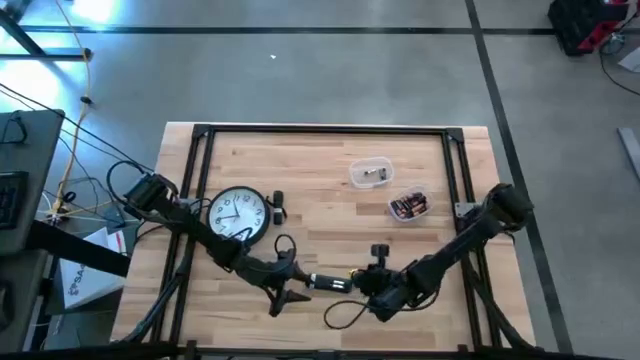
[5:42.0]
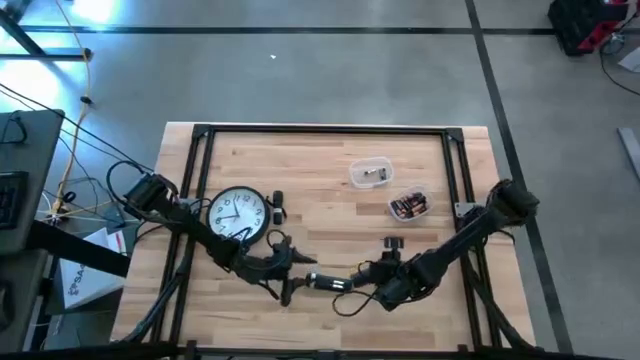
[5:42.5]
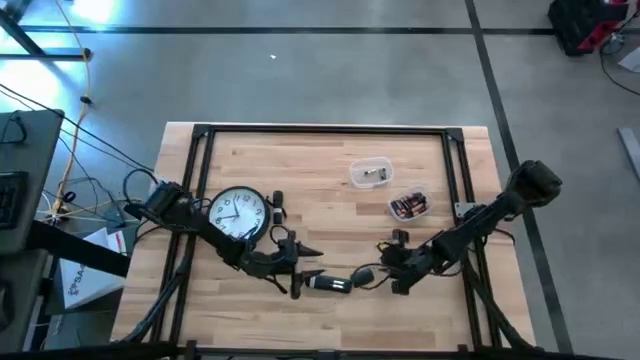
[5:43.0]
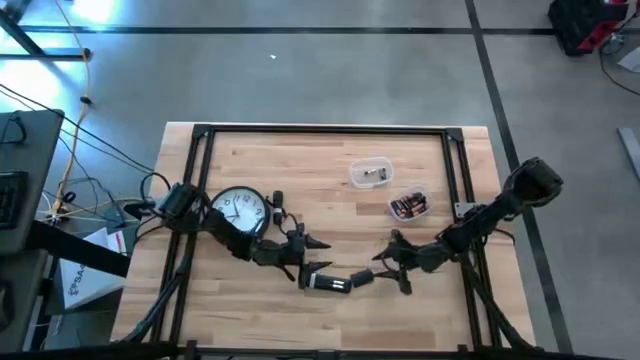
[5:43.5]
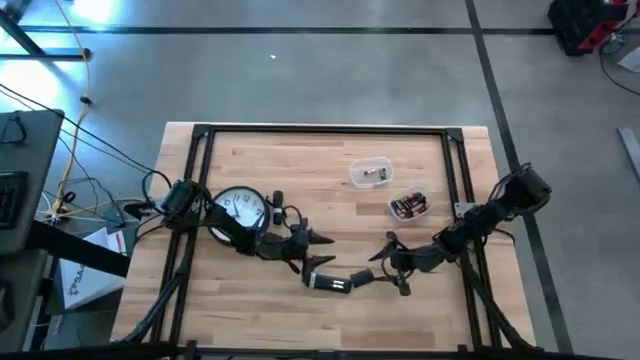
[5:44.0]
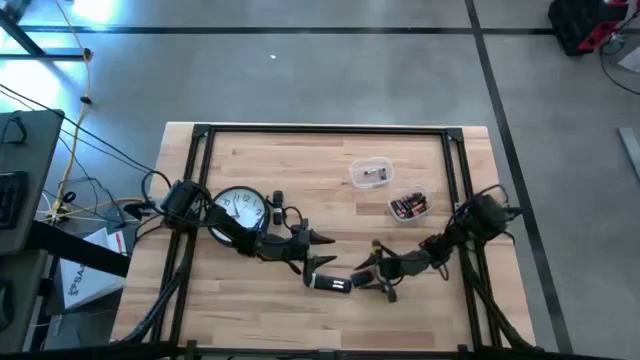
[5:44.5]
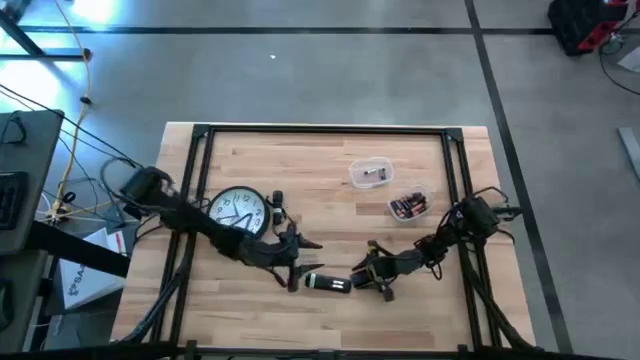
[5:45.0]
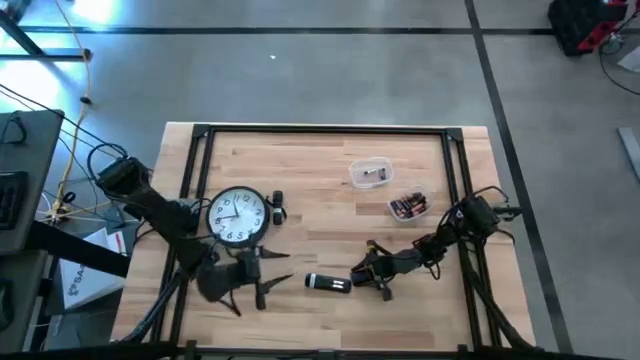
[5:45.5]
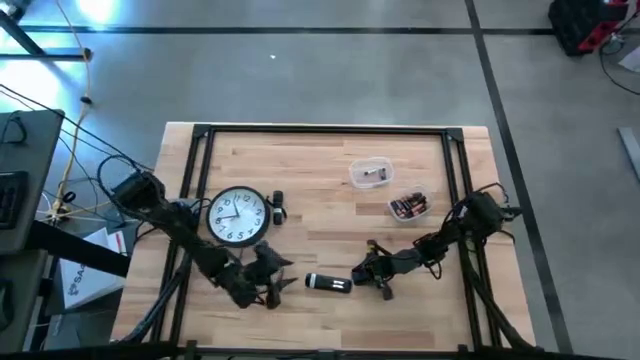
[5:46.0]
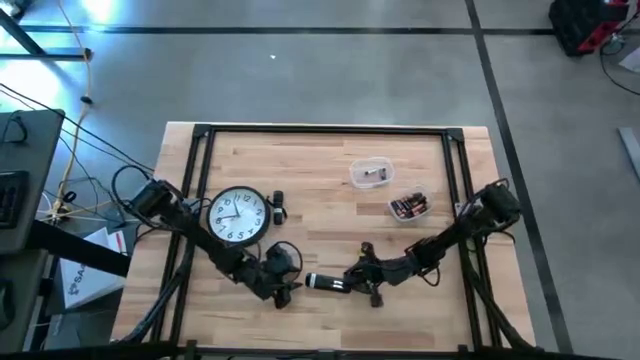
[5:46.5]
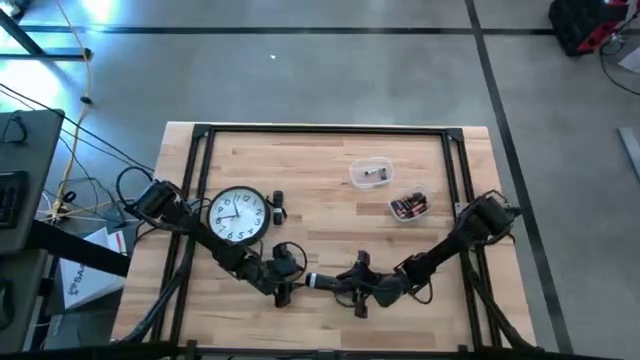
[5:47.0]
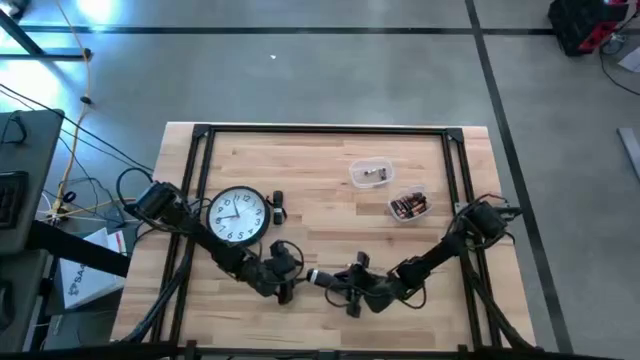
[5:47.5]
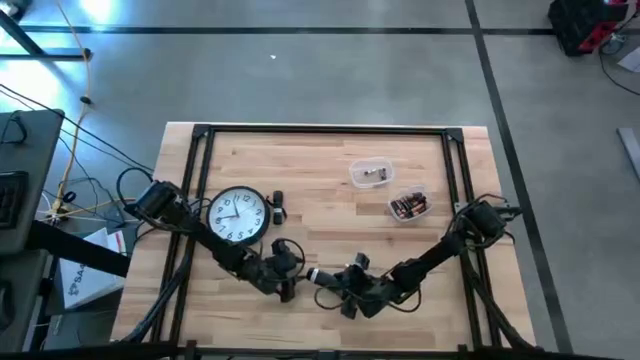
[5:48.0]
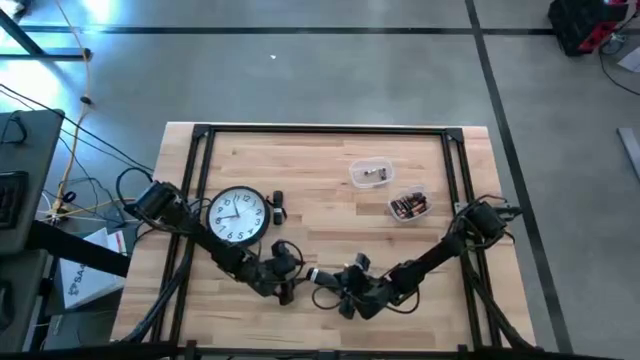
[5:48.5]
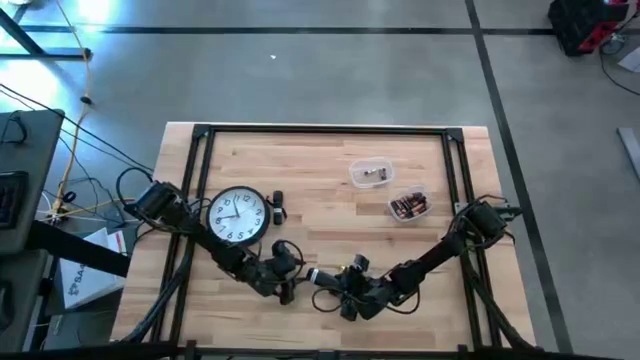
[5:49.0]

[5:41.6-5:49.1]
Task: Insert battery
Close the black remote control cover

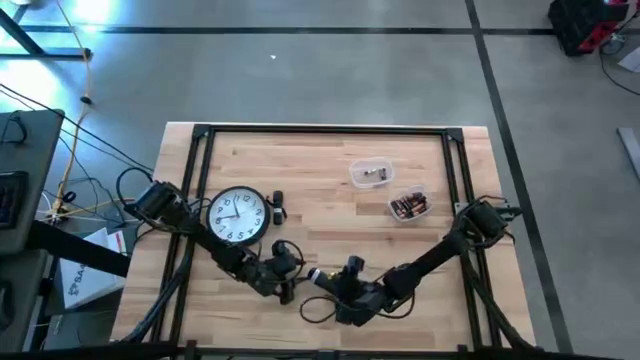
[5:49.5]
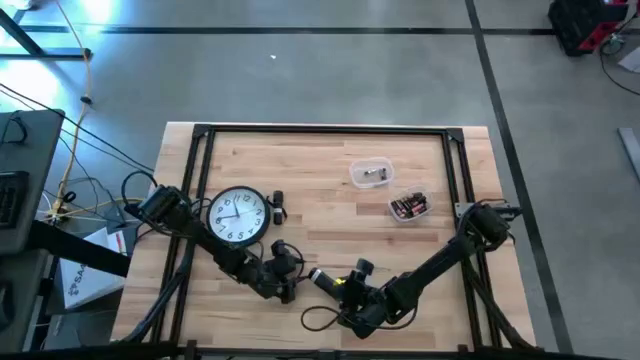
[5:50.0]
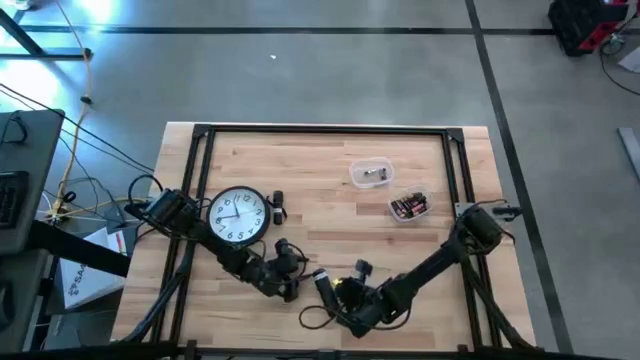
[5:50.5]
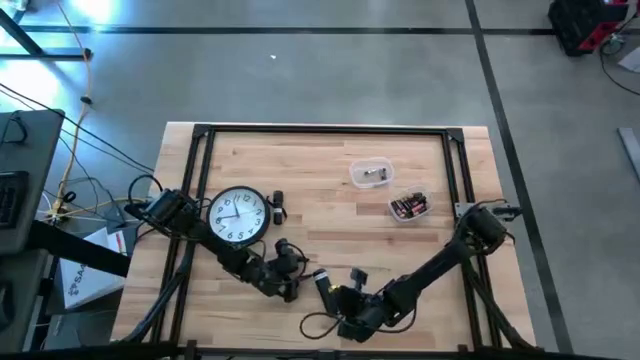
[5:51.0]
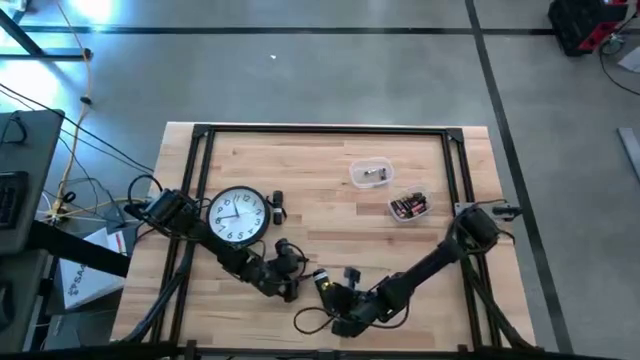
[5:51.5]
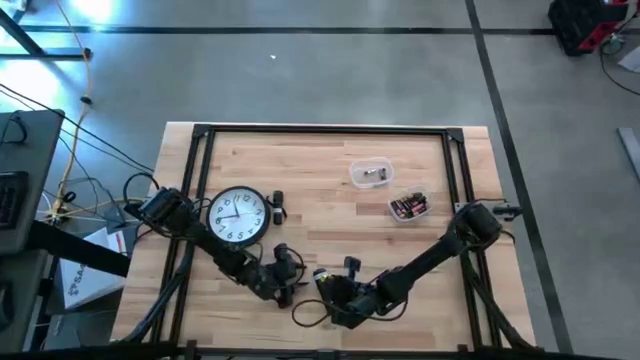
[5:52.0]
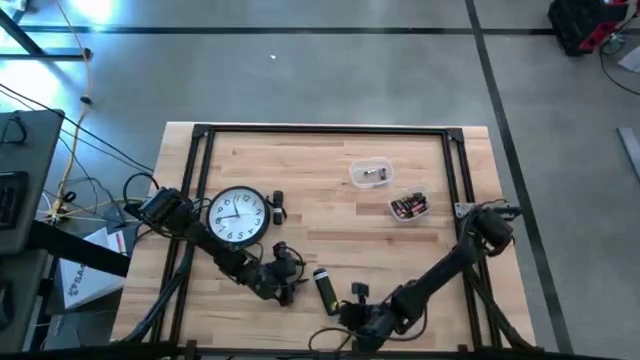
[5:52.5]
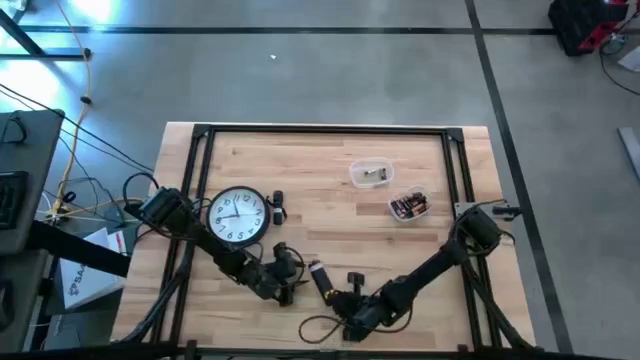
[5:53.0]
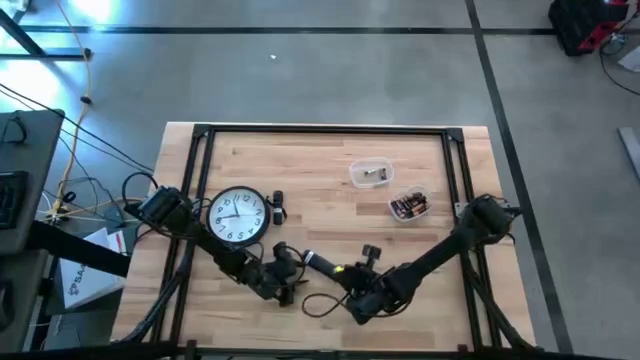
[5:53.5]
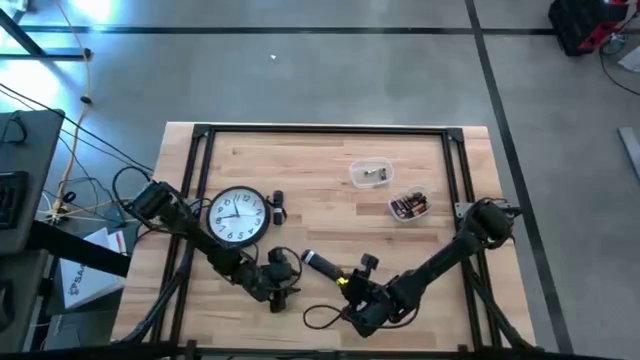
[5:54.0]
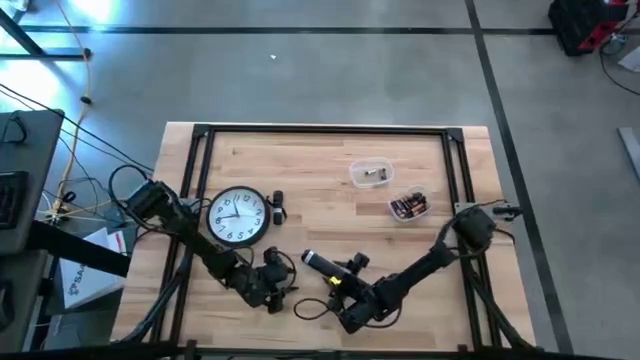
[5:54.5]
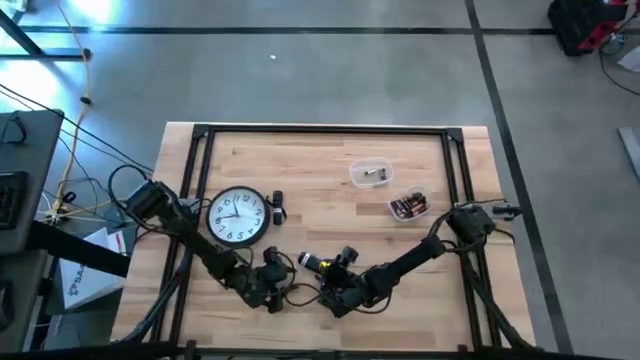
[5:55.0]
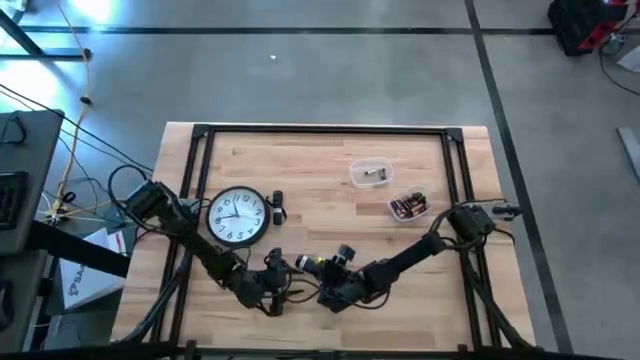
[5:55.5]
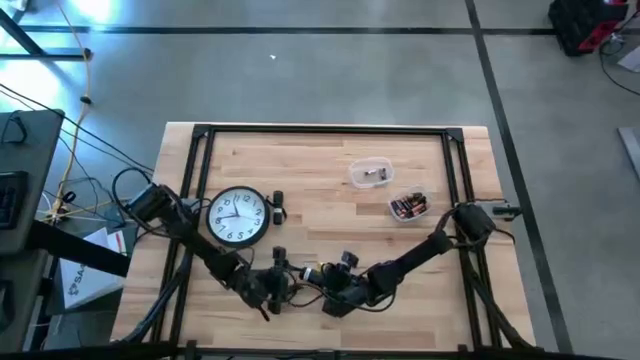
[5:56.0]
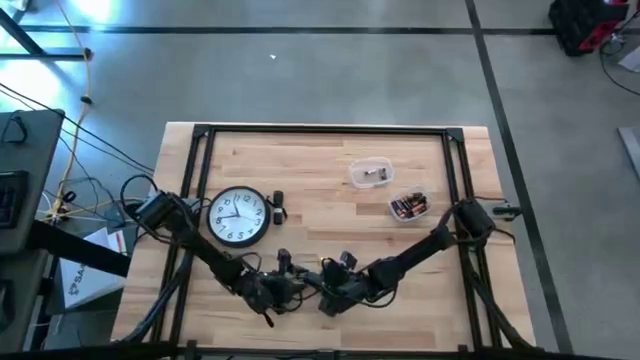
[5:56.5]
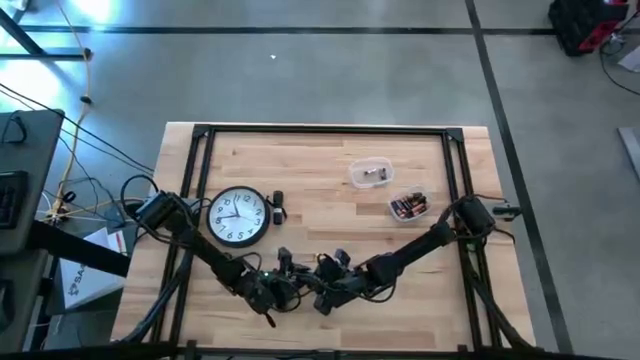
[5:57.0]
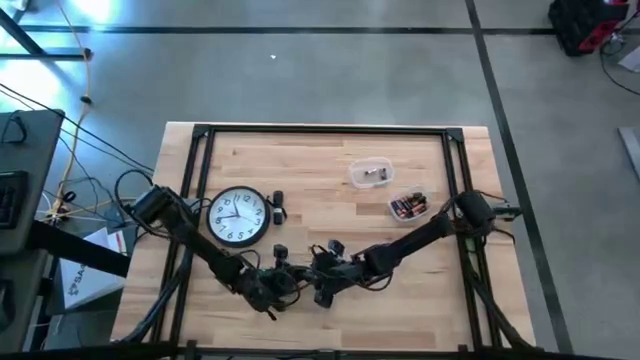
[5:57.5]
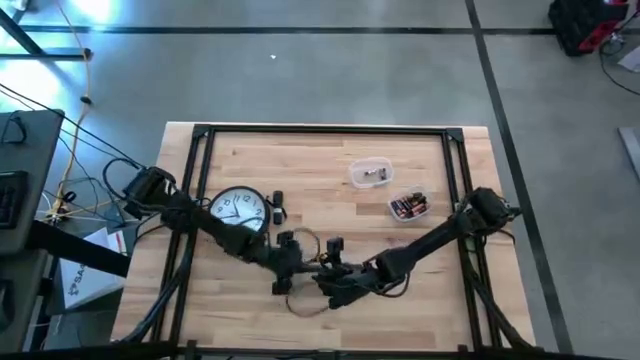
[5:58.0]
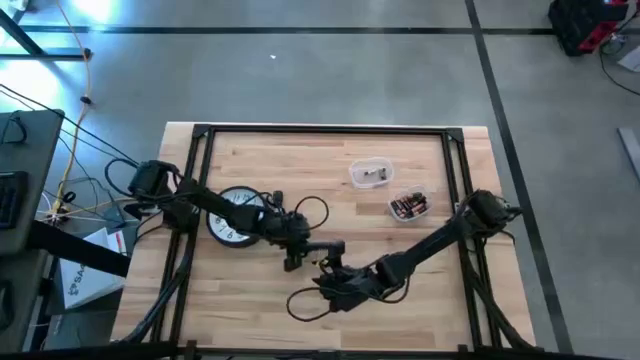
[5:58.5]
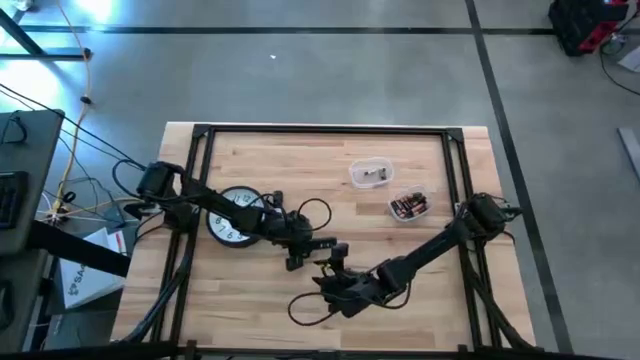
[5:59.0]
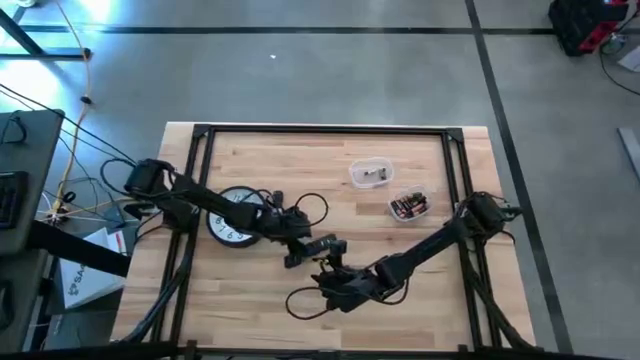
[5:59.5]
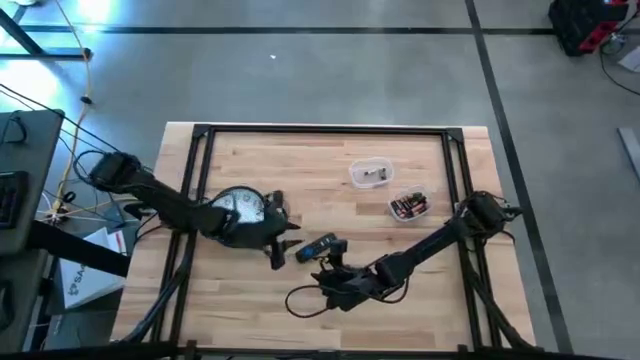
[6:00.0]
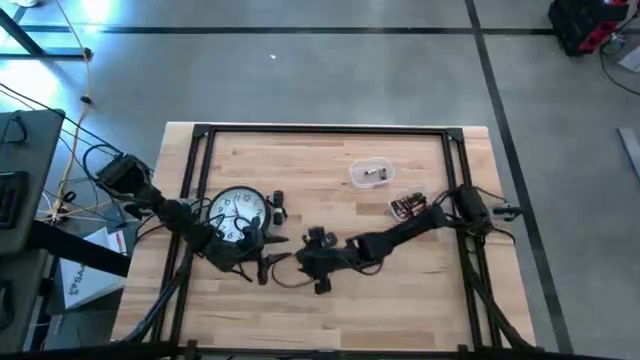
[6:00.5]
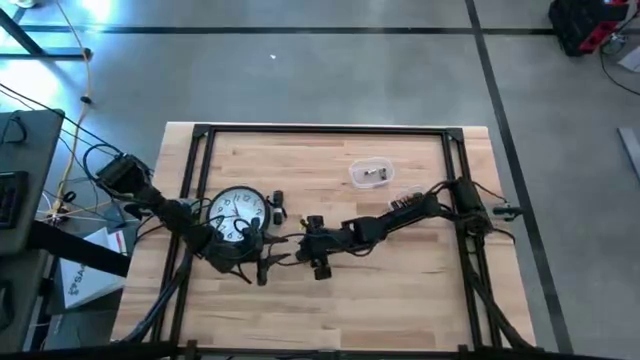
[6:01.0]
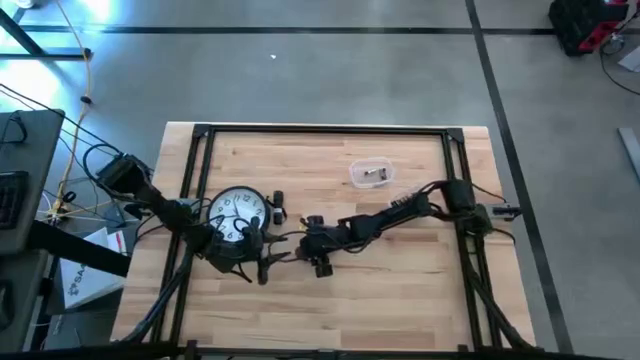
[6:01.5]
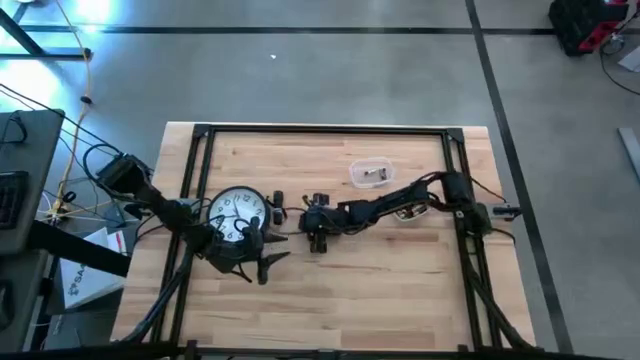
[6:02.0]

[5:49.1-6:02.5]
Put the black remote control face up on the center of the table
